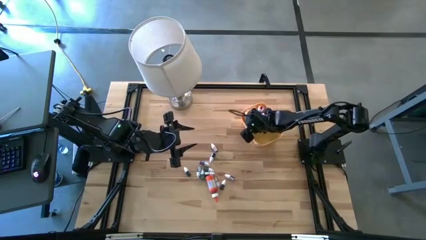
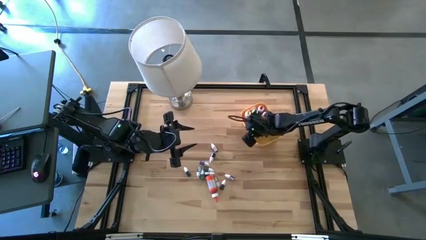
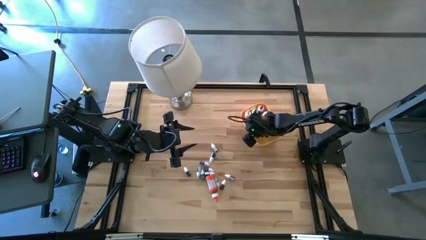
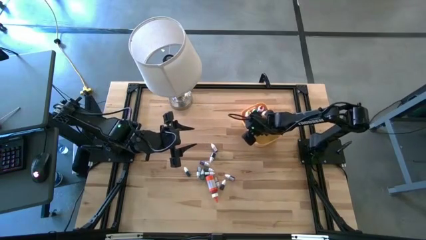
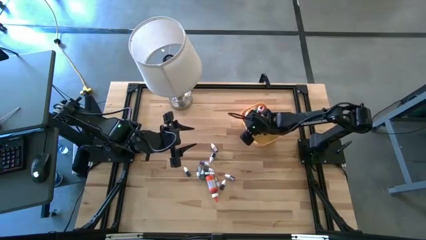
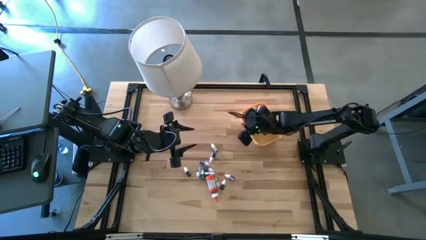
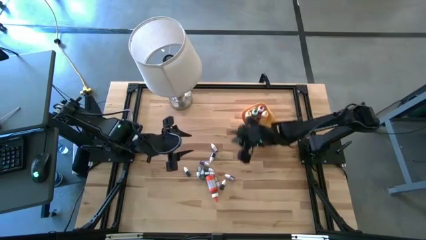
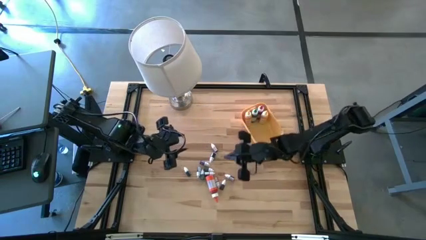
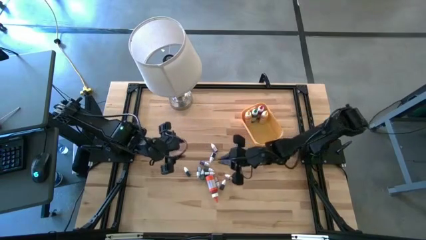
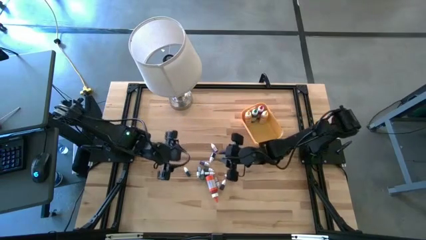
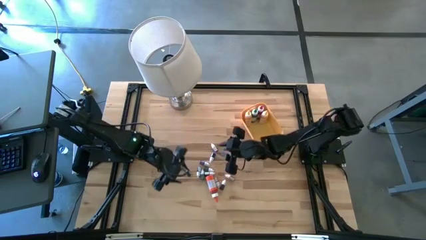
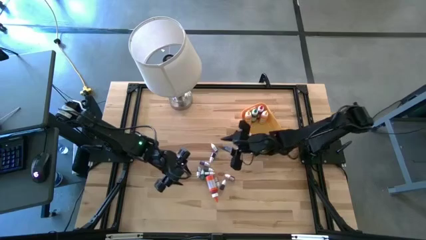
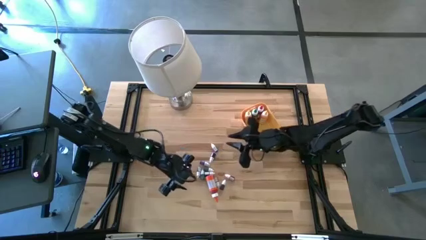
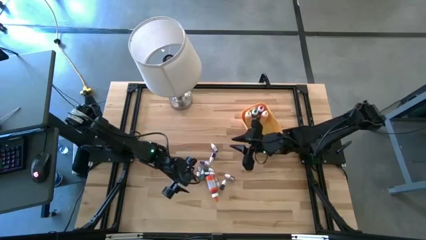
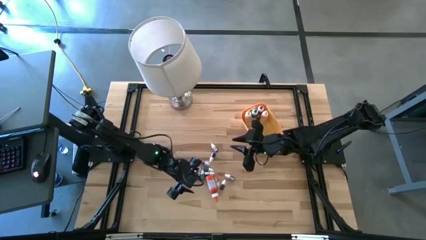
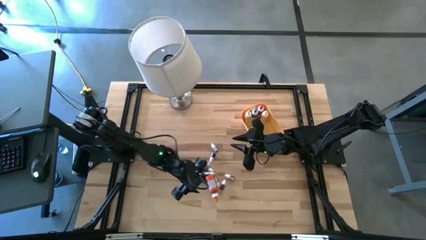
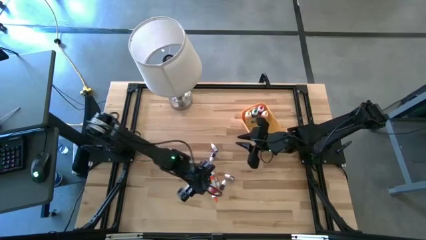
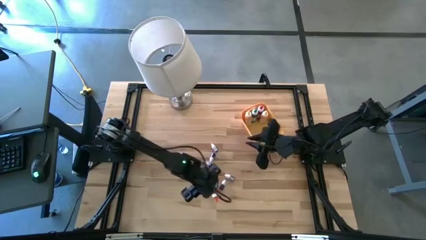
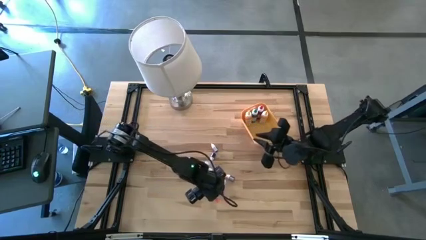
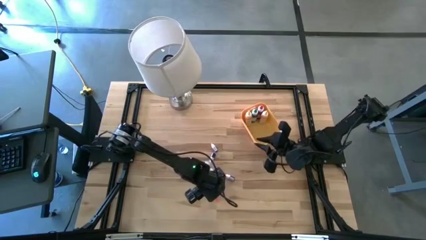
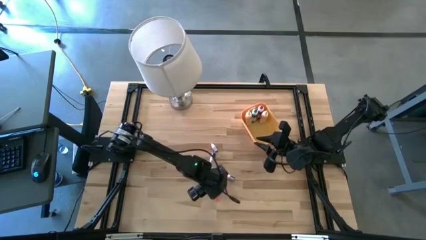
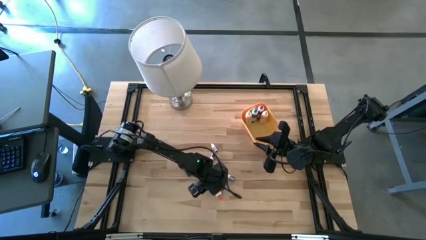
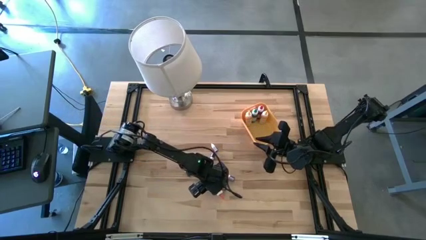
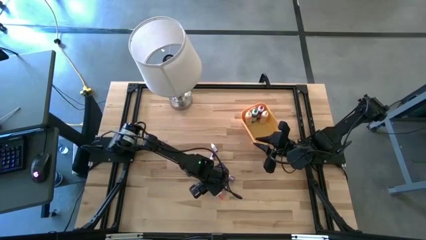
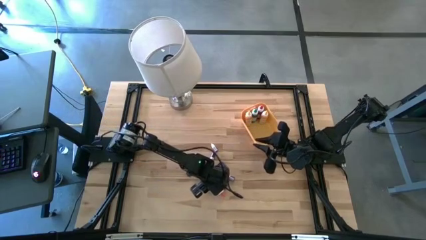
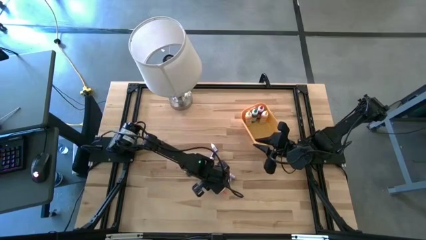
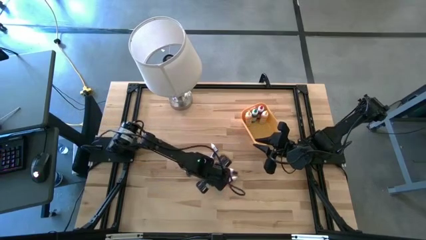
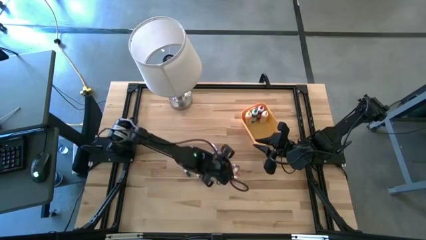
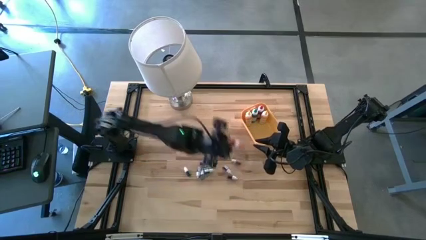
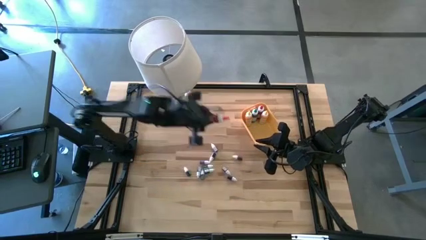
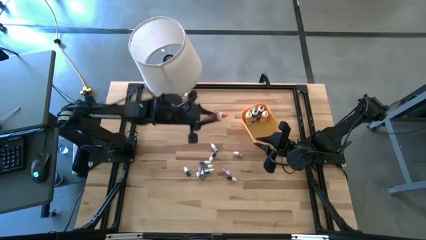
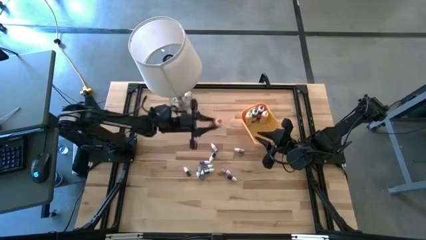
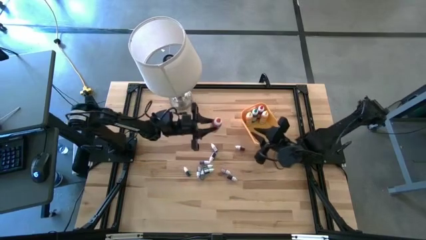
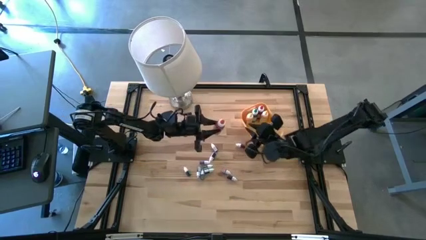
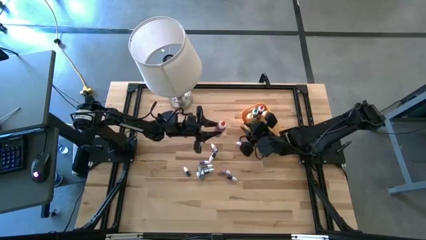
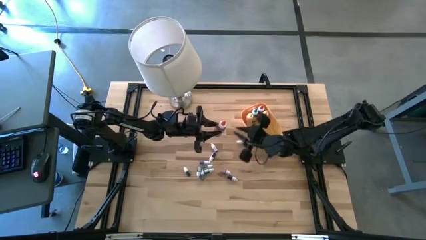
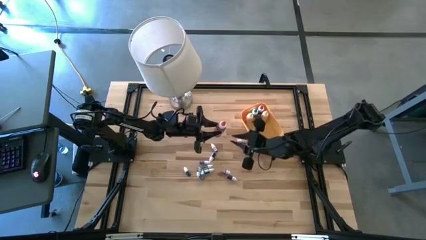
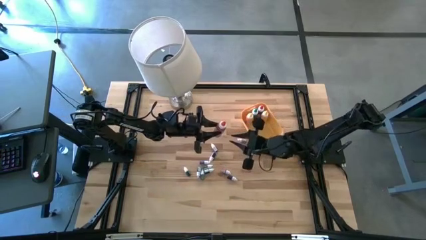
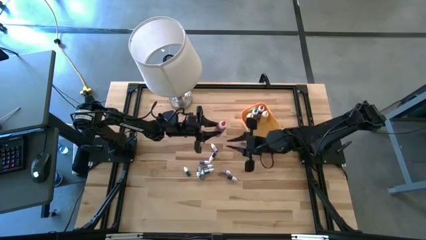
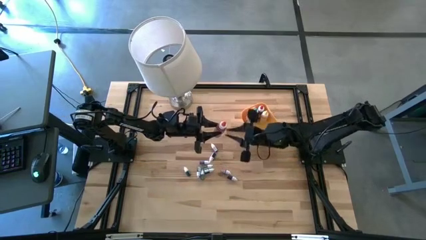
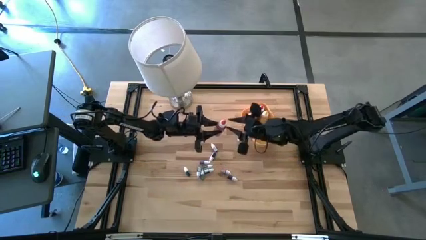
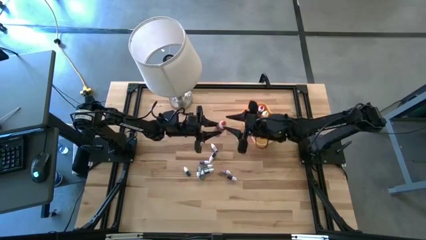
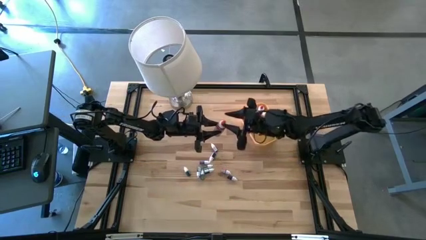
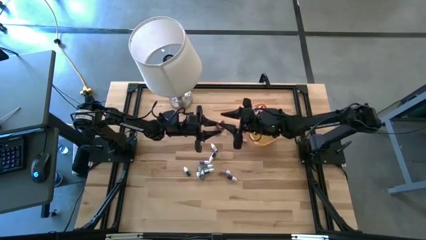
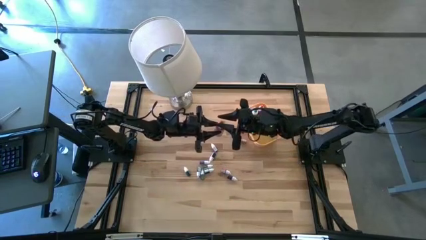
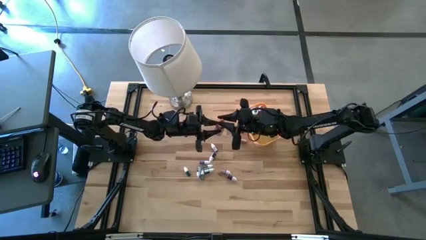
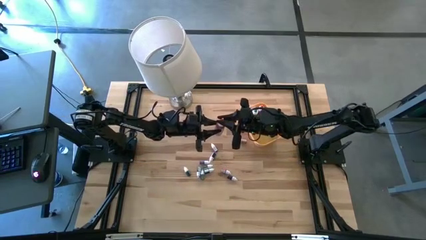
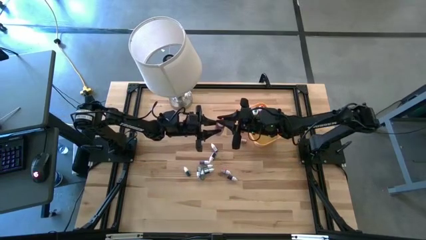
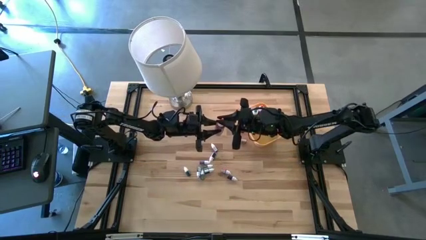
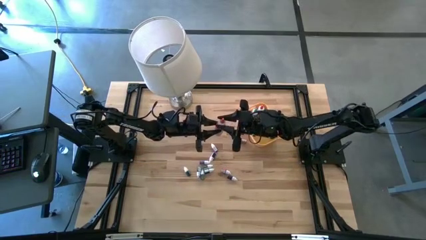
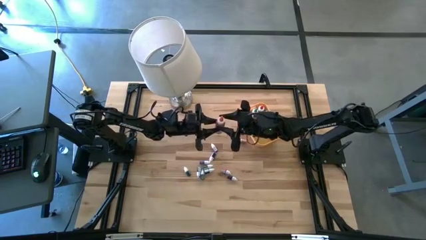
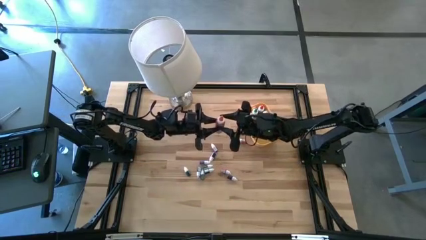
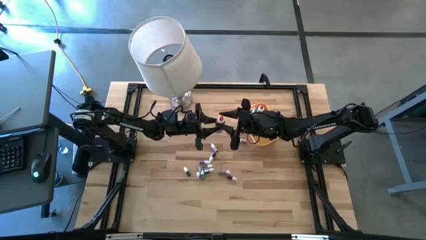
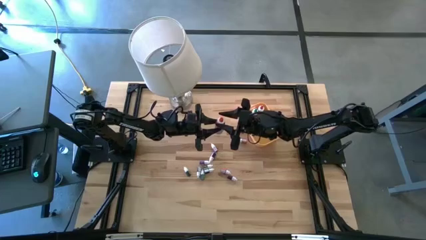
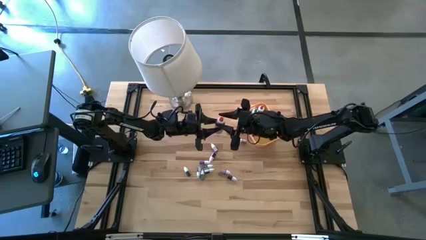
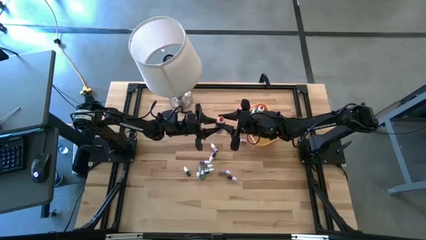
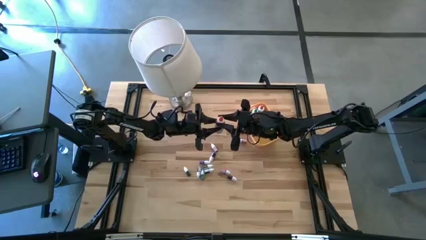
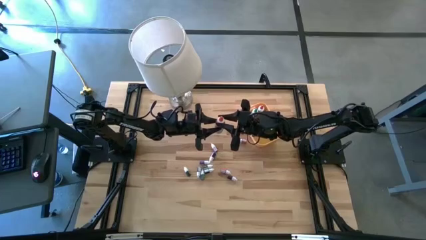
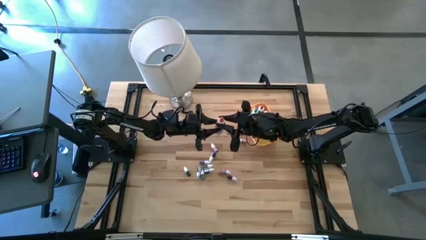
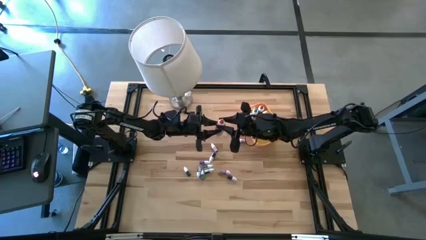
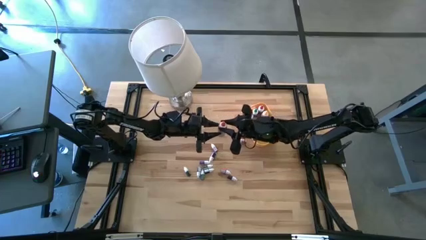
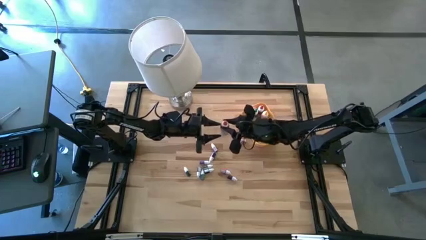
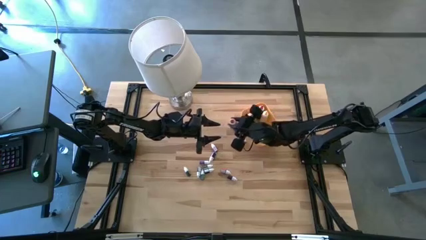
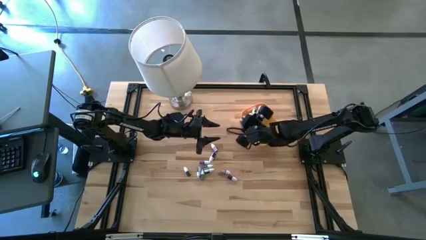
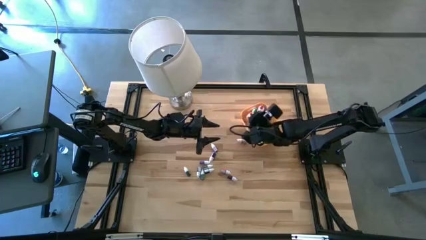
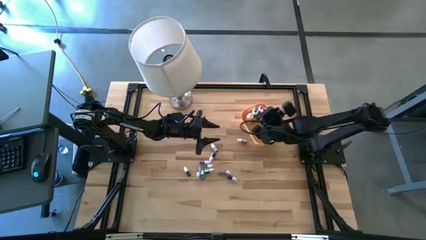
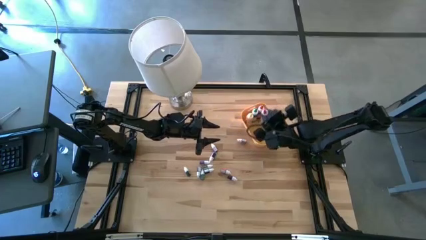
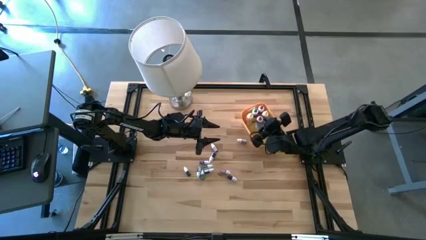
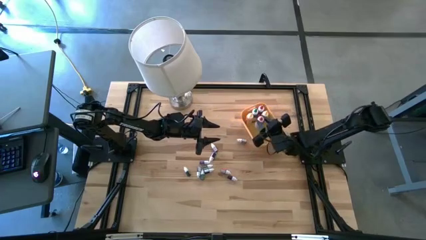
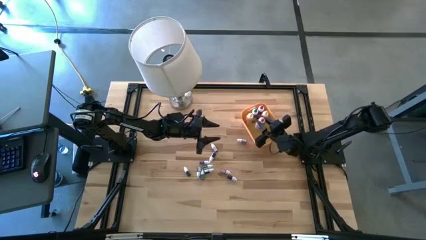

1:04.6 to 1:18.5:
Task: Pick & Place food coloring
Put the large orange food coloring bottle into the yellow bin
